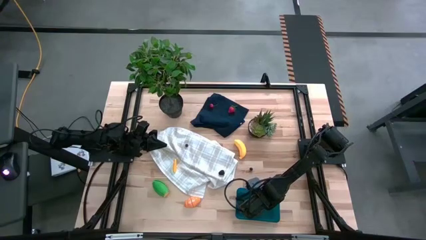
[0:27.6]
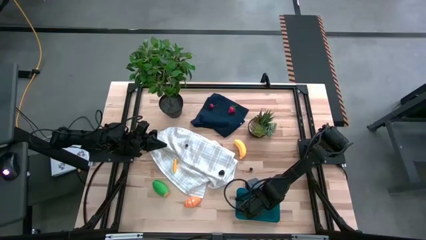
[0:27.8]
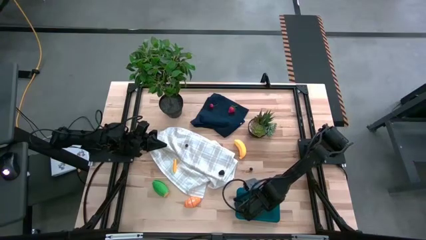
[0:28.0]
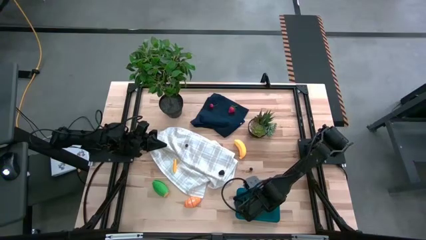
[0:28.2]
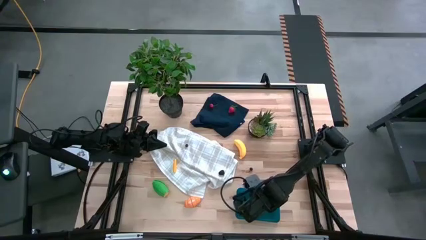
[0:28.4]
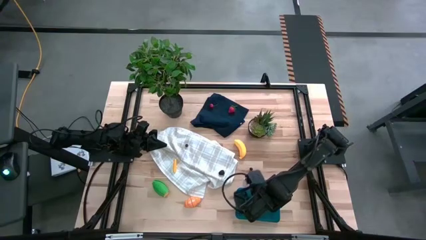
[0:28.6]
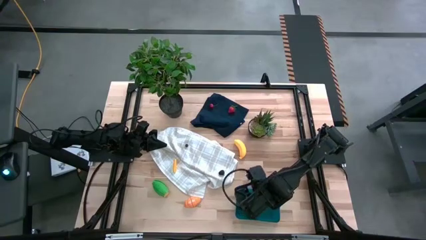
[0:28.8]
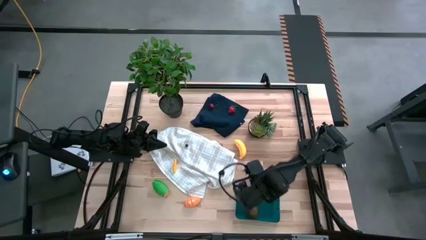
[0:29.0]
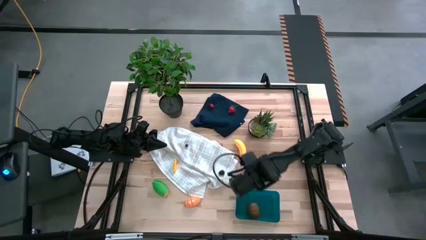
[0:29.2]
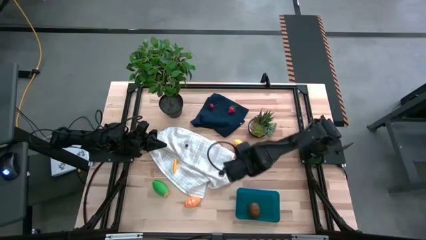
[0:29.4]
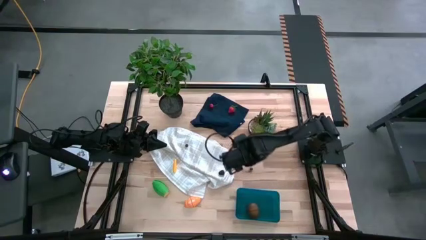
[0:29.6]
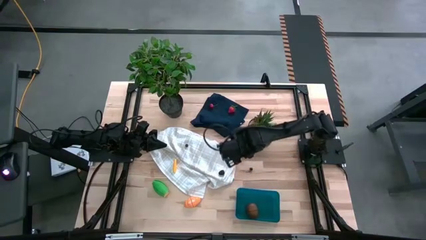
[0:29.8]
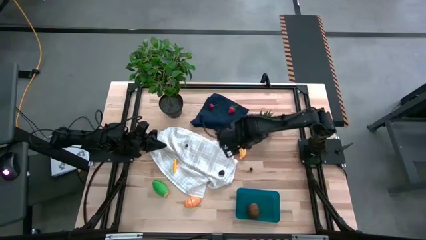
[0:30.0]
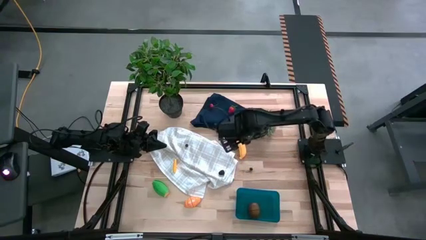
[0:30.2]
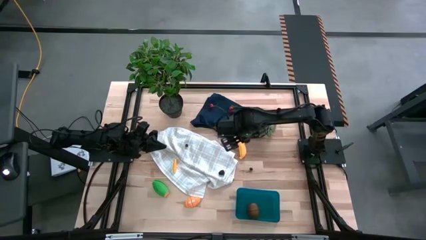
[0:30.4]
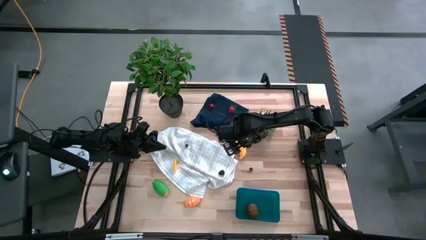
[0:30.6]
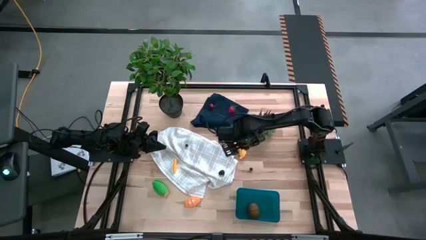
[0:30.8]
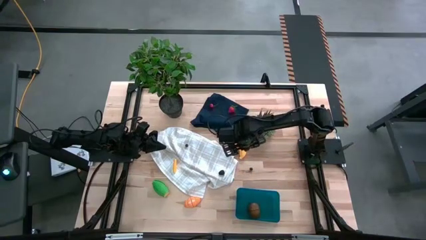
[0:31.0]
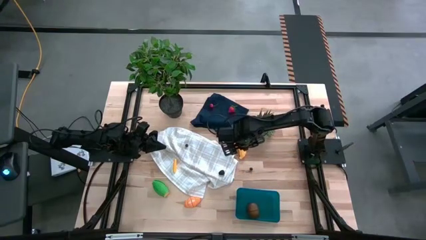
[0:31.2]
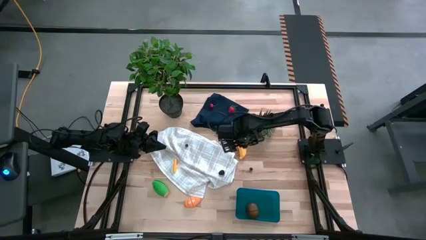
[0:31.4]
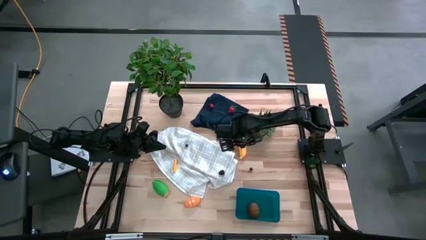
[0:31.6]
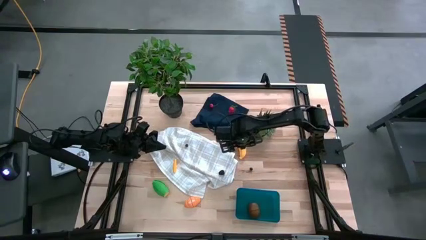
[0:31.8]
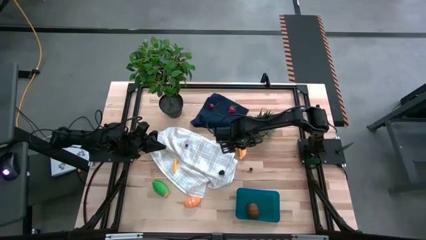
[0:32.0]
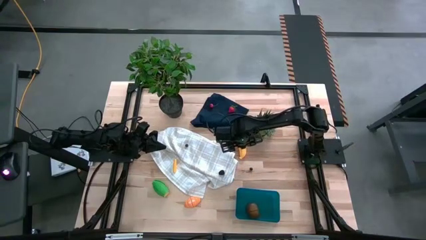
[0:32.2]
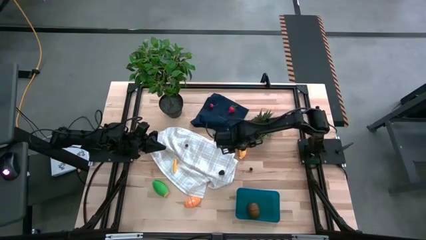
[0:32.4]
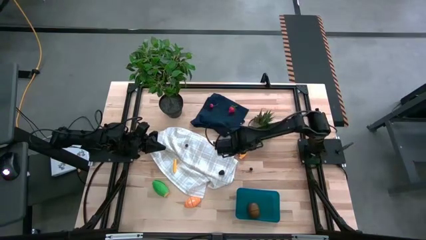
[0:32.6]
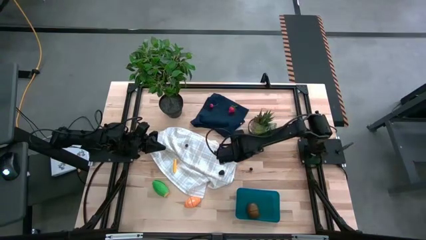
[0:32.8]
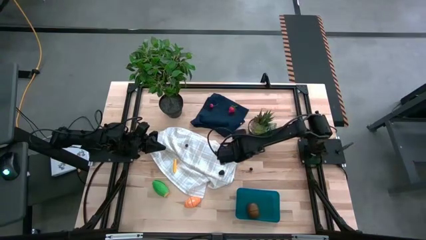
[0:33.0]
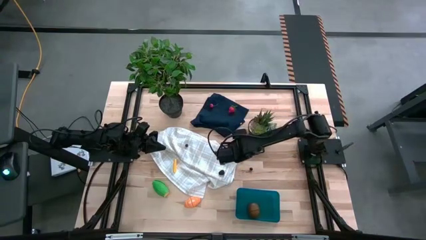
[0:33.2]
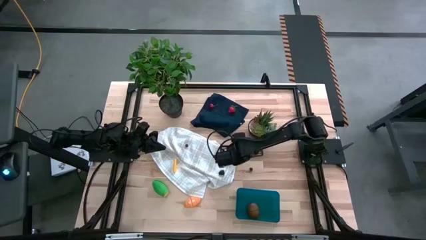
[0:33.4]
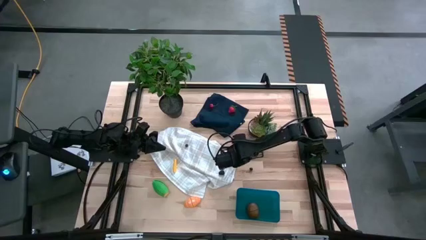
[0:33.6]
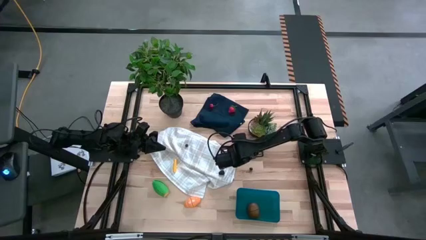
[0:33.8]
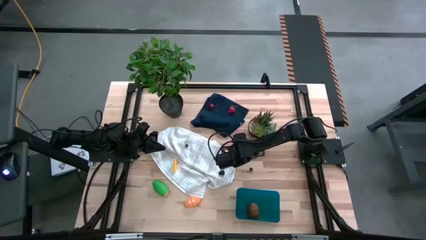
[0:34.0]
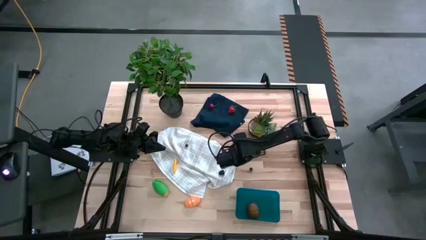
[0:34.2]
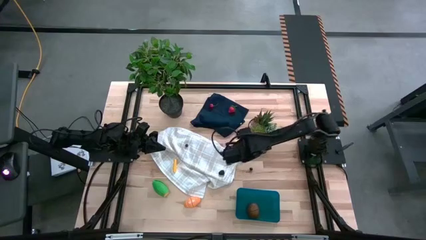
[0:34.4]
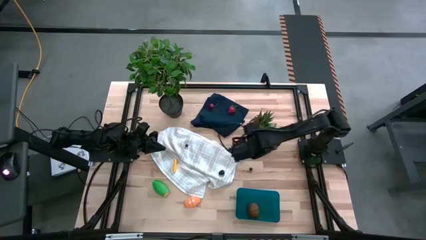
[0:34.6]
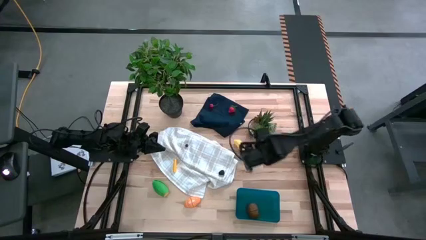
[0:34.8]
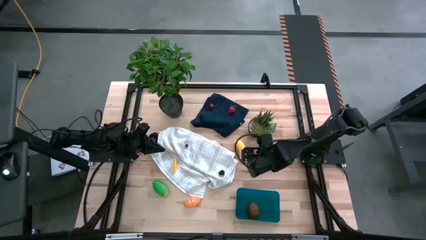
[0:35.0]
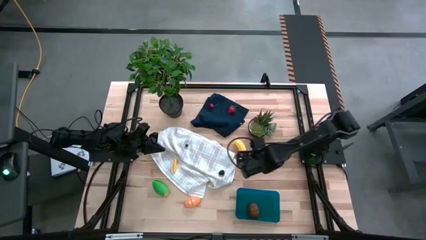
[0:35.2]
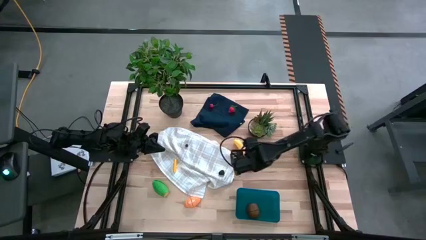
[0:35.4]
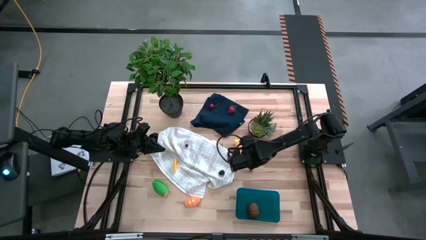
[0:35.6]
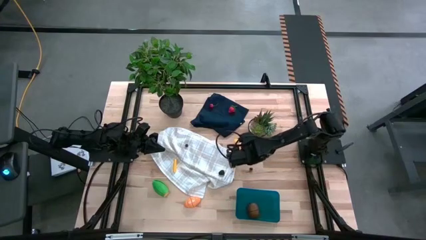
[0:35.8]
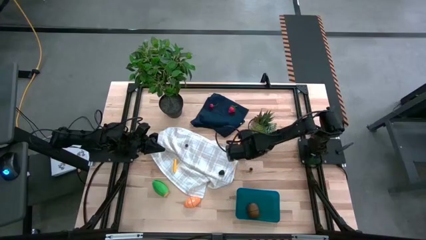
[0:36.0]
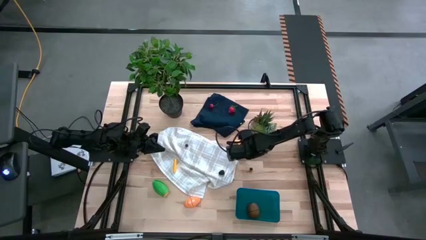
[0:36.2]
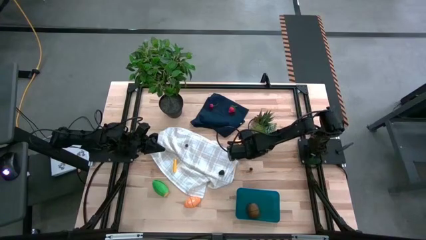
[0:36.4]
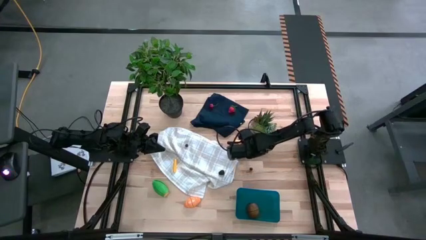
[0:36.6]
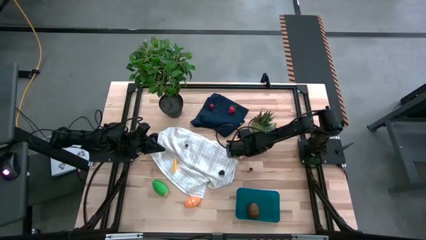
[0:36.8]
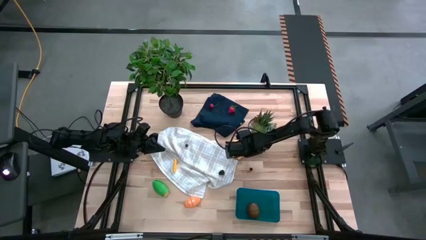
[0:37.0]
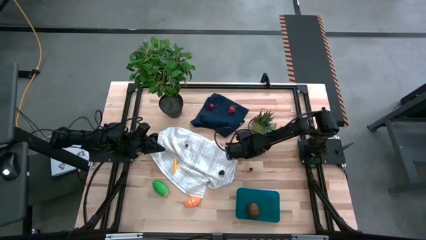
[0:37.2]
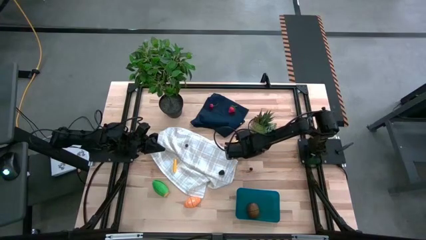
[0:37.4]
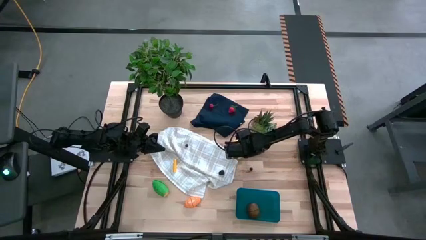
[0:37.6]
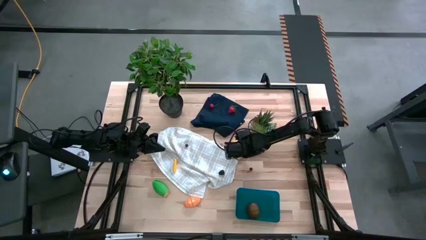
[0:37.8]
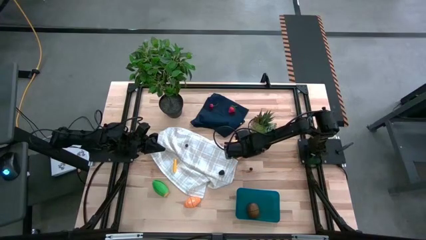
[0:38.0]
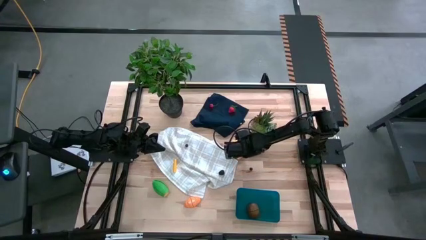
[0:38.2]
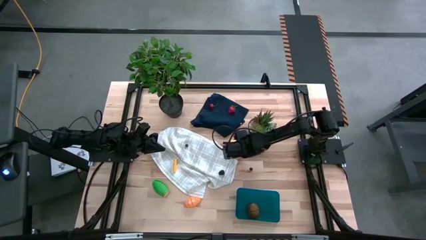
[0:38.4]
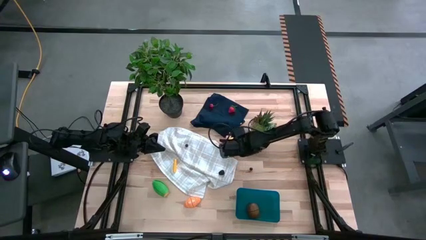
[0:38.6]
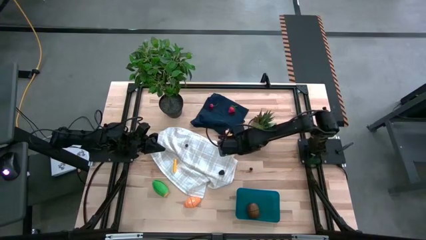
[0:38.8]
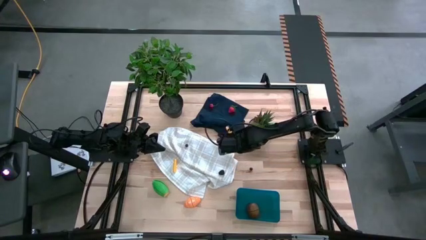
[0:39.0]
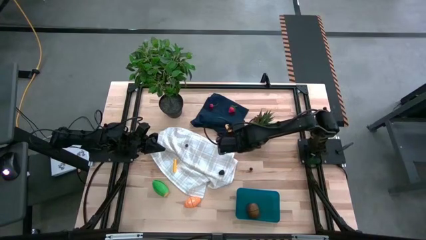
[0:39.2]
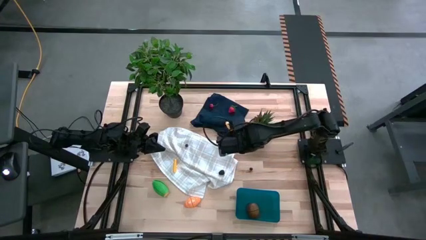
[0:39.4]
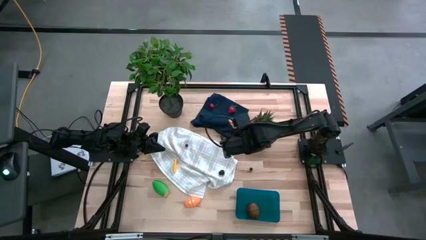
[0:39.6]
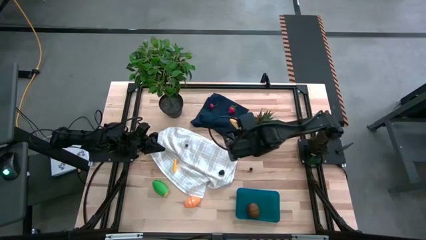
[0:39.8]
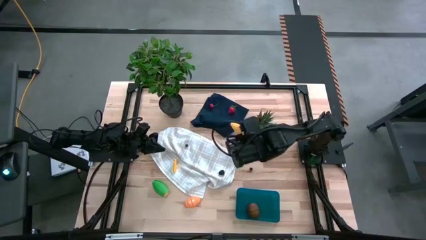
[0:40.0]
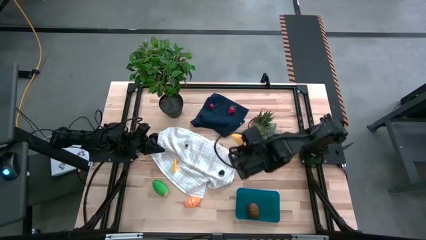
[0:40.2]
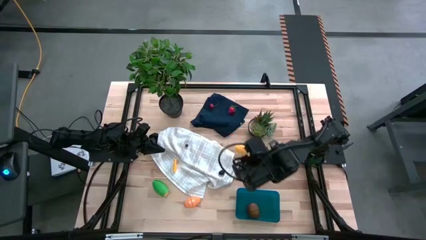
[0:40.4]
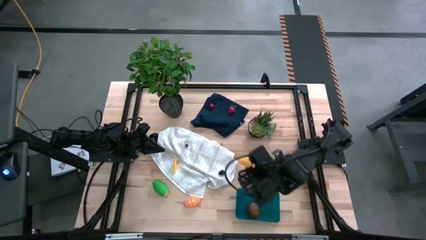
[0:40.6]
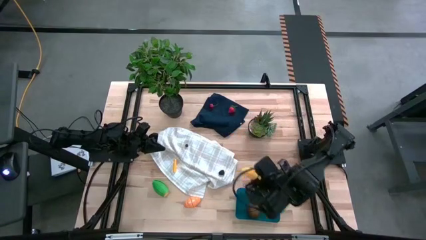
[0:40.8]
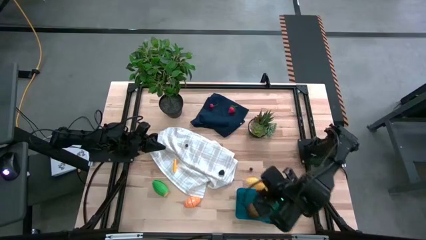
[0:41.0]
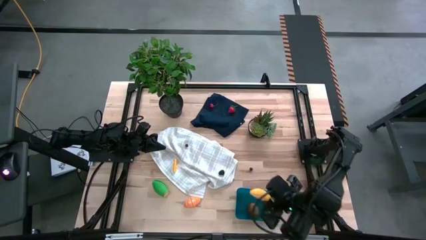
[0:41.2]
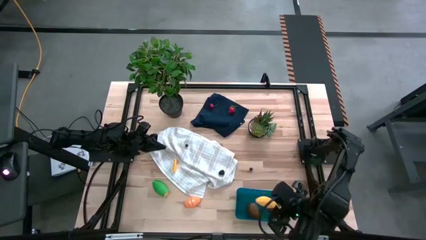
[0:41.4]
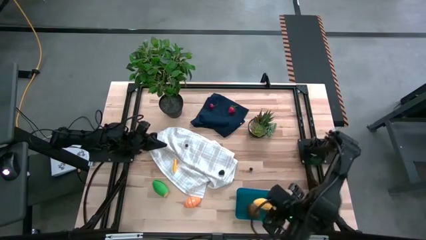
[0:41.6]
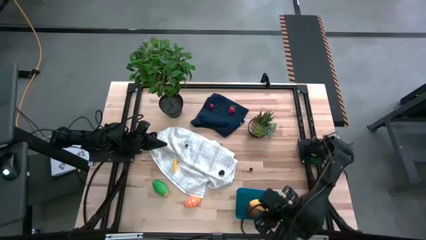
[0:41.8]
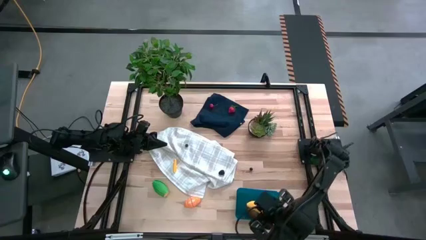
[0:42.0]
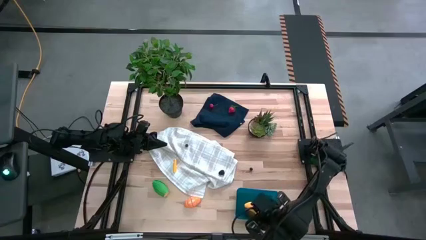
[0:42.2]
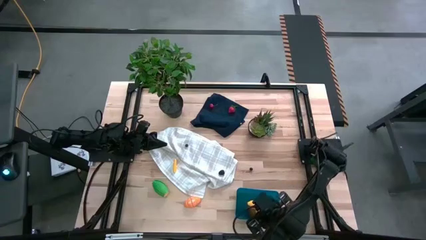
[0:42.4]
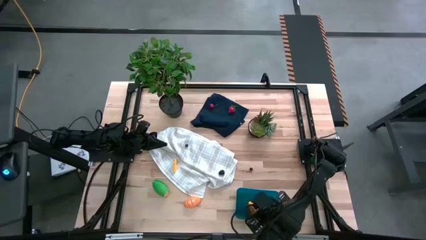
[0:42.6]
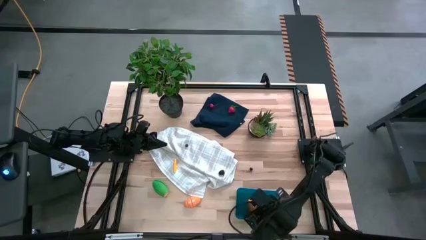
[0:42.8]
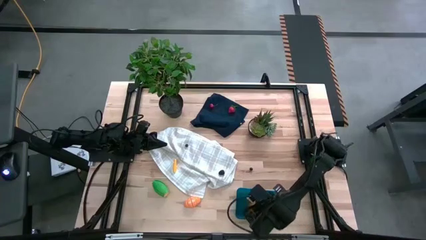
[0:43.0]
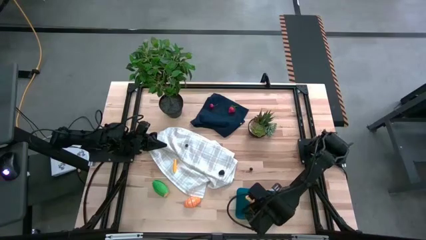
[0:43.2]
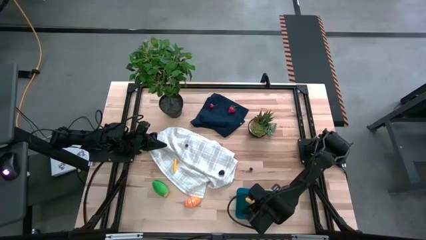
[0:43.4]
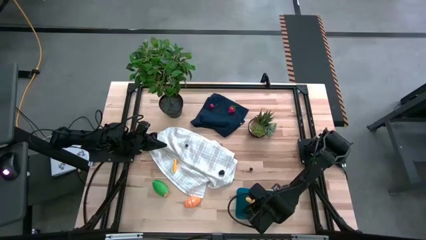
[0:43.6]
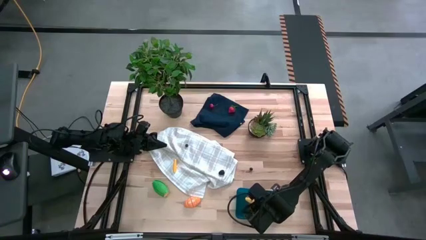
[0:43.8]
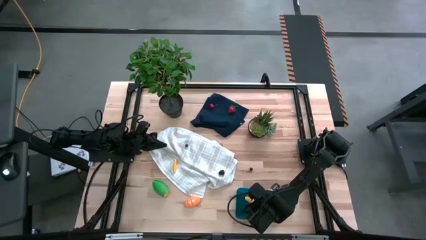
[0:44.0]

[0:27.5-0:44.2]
Task: Pick and placing Produce into tupperware
Put the banana into the bin
